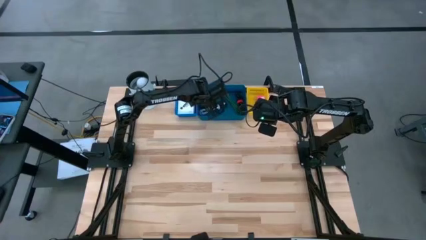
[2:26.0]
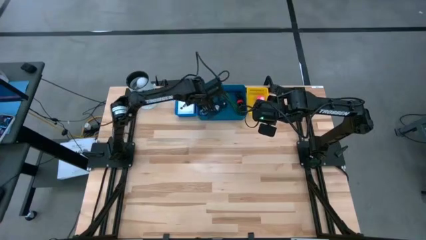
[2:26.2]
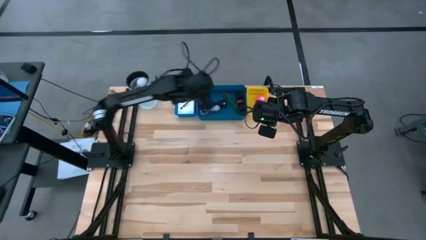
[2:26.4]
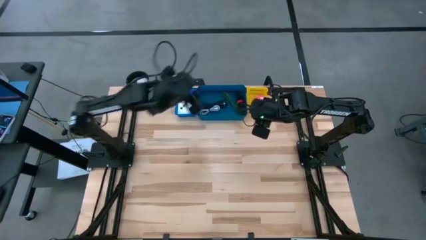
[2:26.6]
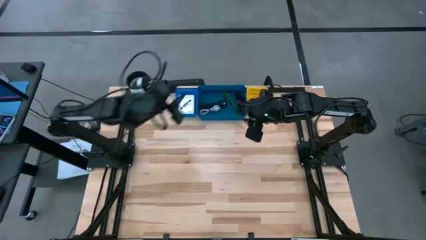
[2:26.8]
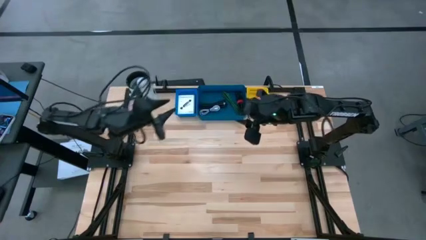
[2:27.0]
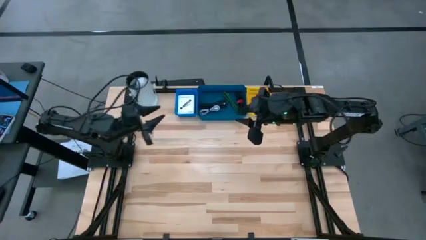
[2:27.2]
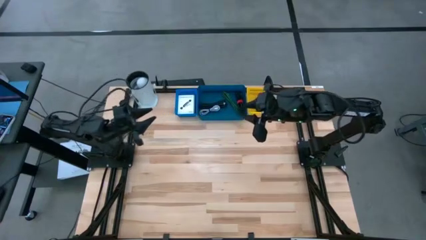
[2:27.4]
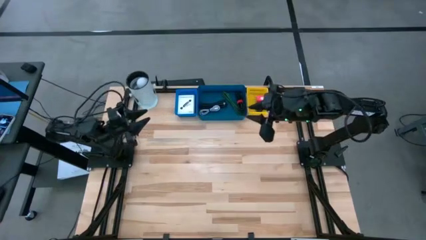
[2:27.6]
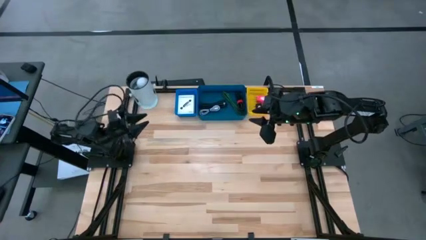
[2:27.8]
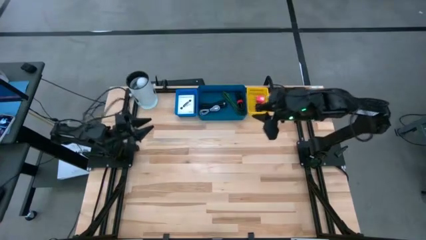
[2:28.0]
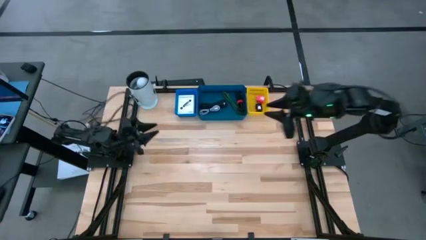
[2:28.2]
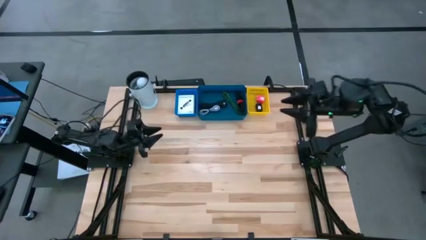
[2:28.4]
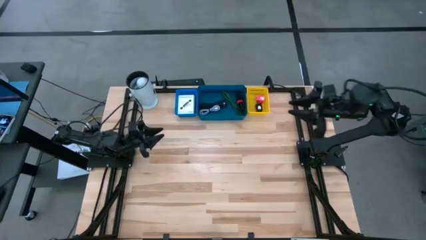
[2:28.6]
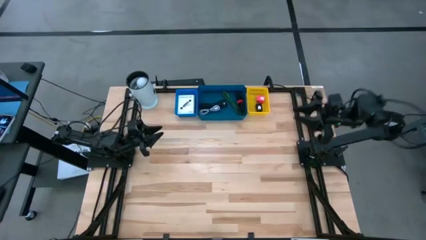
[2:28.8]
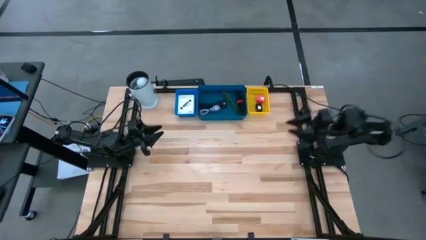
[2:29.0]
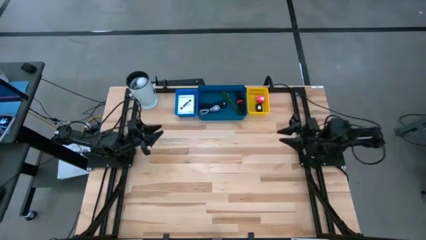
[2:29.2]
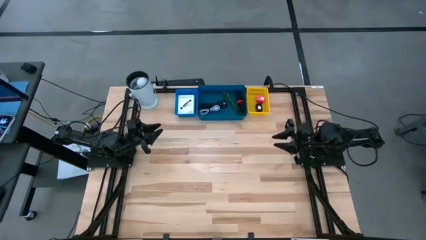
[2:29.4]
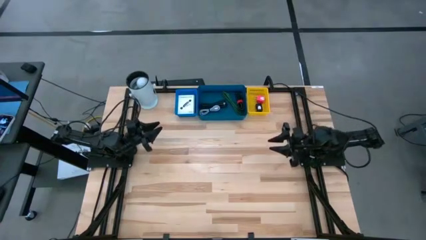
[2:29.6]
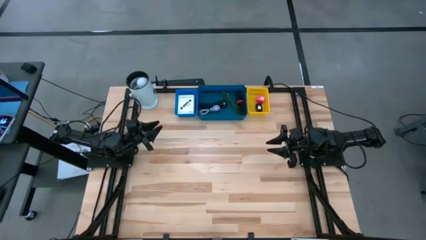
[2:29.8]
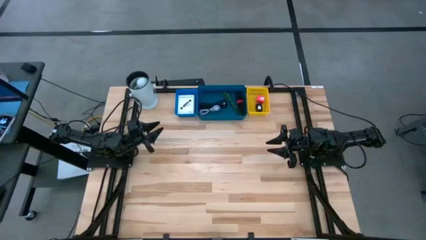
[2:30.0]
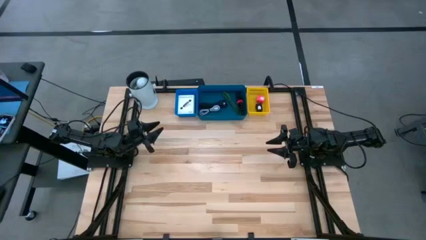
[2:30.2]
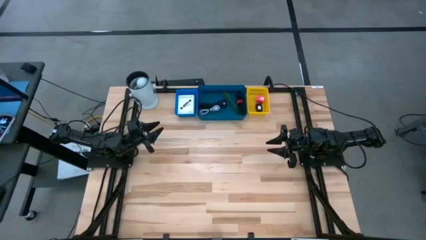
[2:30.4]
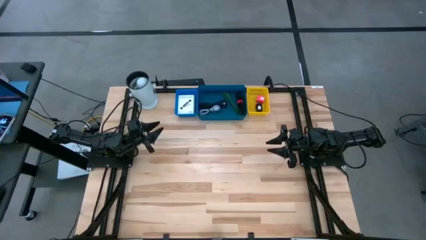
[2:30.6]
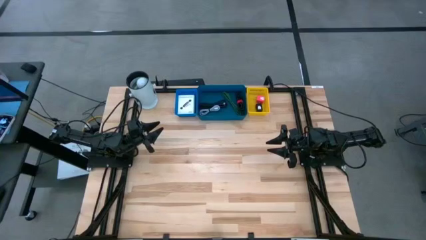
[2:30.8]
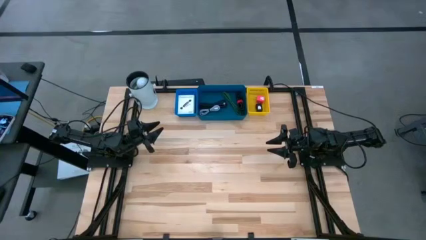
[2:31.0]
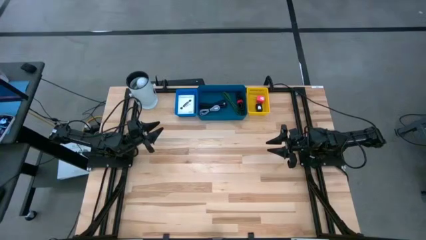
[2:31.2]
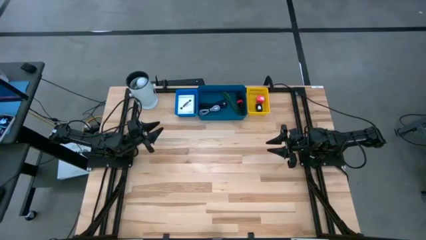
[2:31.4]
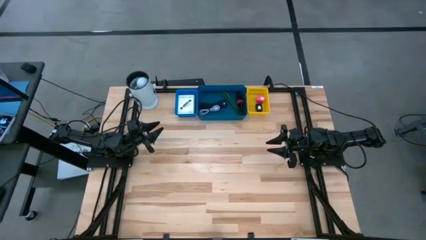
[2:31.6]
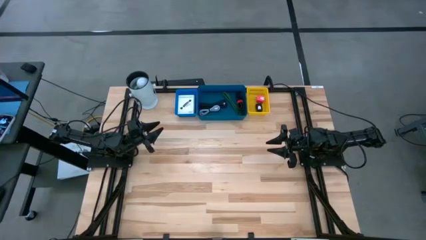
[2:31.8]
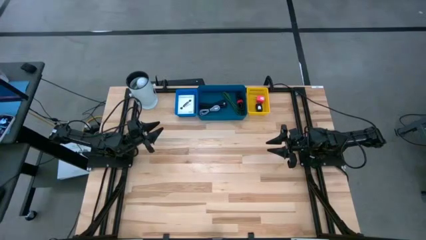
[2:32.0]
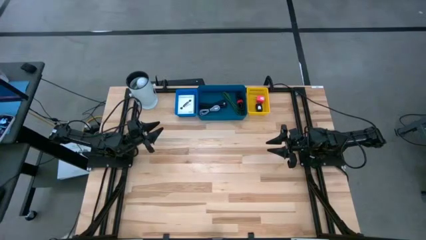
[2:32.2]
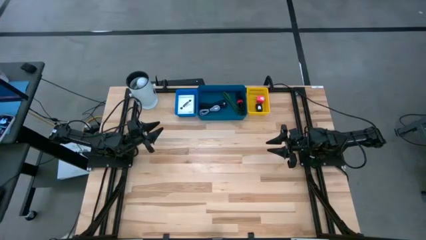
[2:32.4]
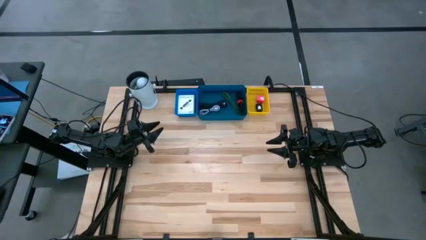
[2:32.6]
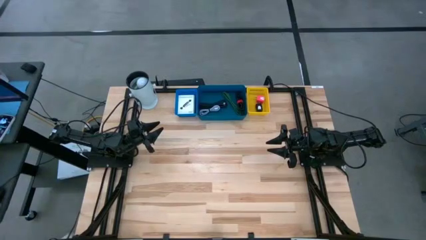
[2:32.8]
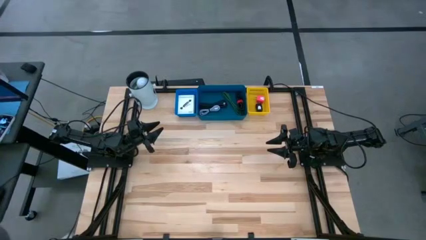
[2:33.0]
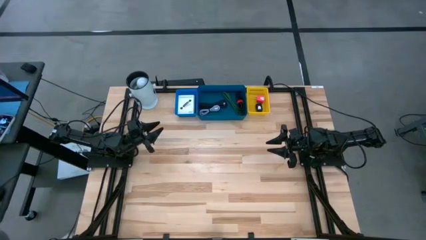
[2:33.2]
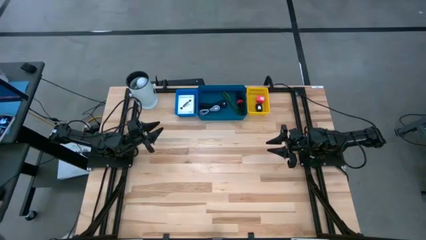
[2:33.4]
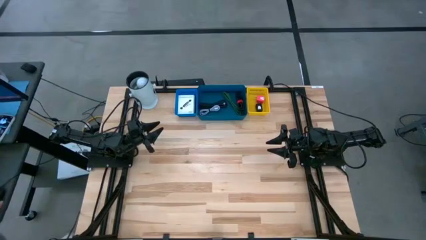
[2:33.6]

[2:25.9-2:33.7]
Task: Pick and place items into bin
Return to Home Position

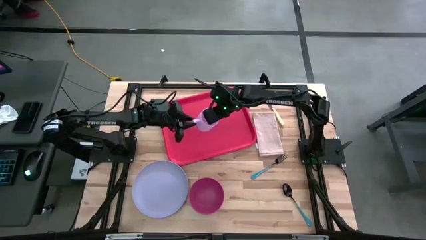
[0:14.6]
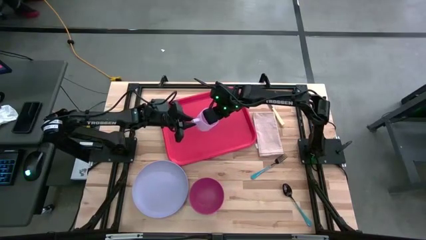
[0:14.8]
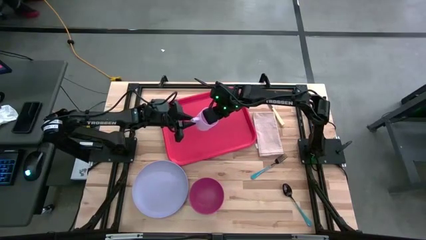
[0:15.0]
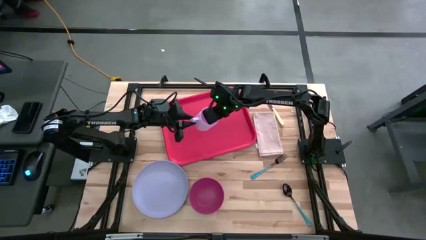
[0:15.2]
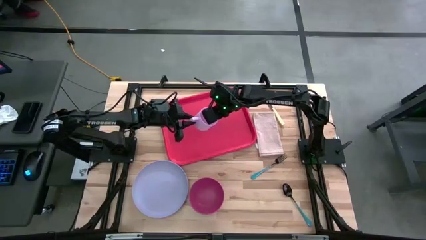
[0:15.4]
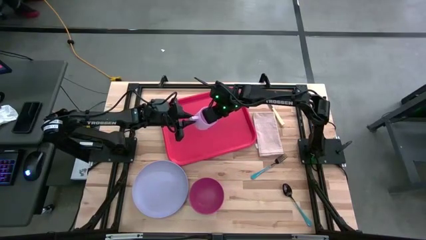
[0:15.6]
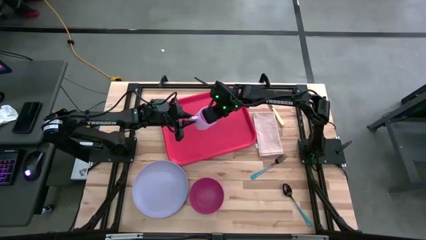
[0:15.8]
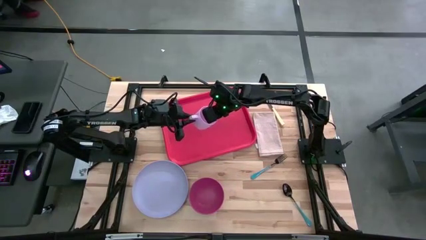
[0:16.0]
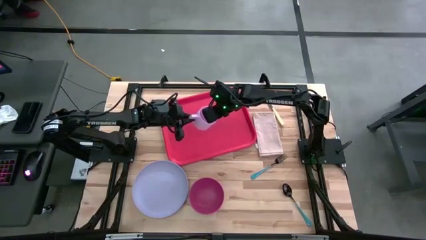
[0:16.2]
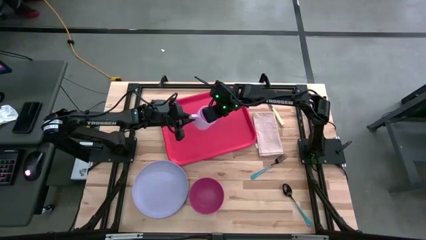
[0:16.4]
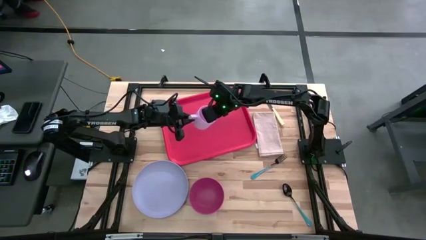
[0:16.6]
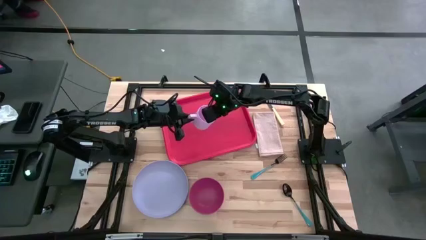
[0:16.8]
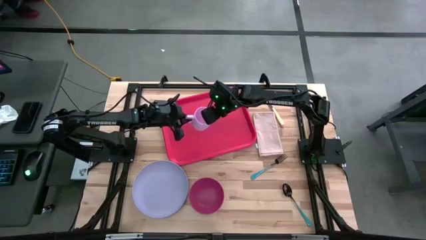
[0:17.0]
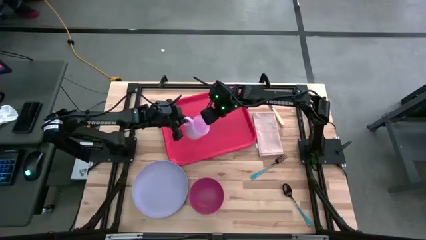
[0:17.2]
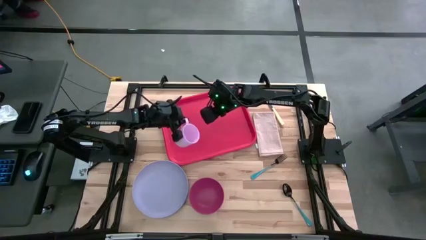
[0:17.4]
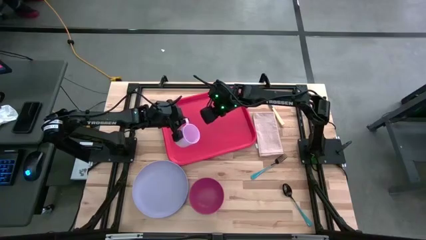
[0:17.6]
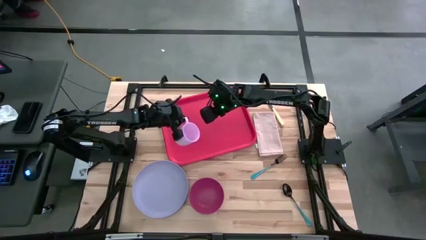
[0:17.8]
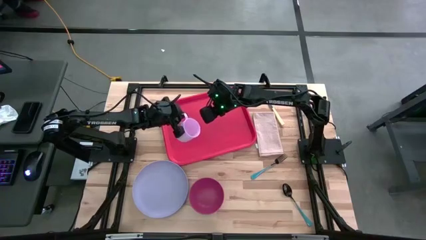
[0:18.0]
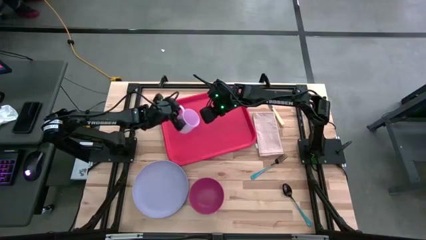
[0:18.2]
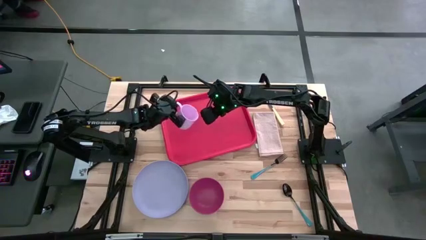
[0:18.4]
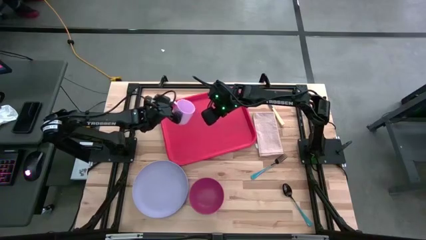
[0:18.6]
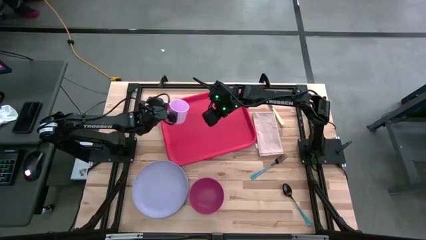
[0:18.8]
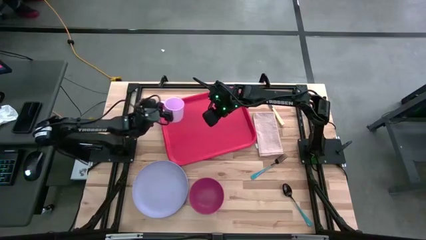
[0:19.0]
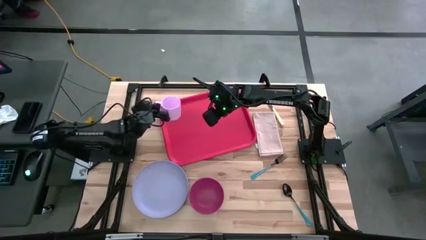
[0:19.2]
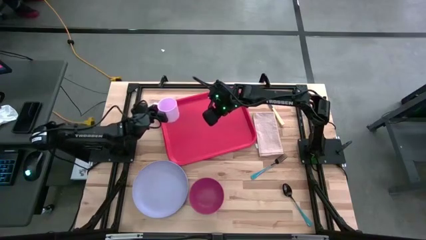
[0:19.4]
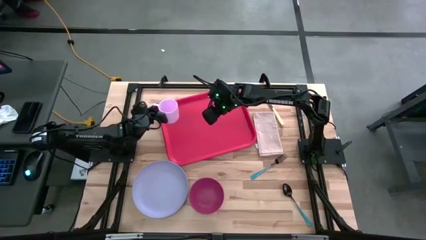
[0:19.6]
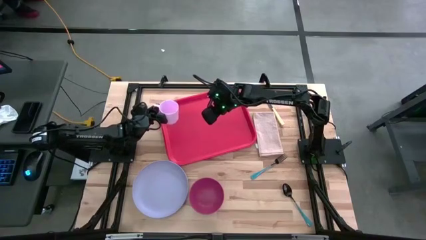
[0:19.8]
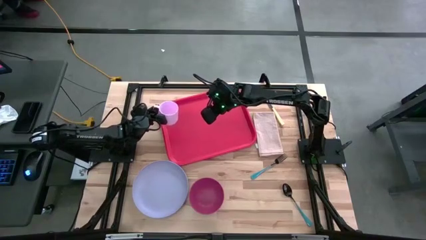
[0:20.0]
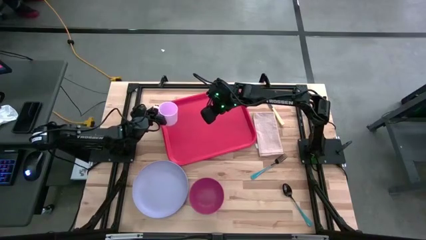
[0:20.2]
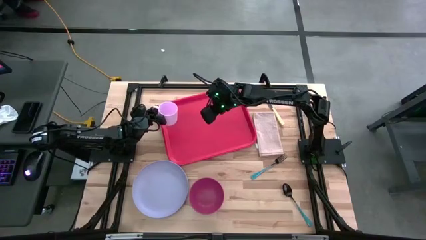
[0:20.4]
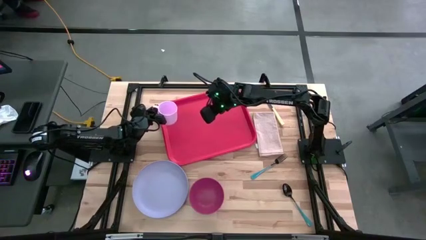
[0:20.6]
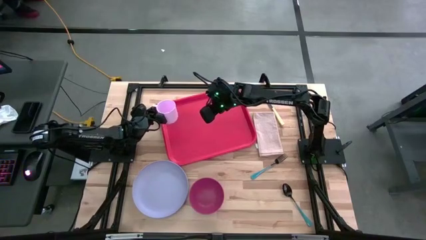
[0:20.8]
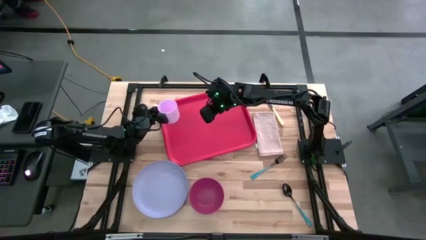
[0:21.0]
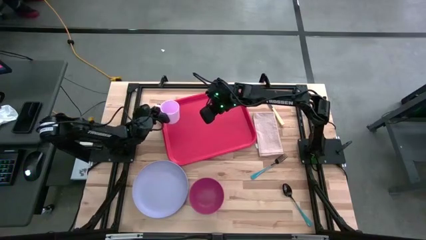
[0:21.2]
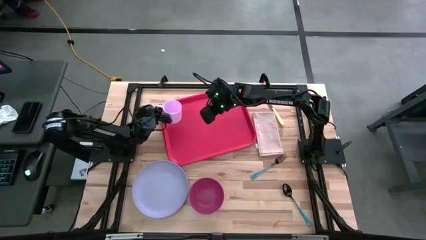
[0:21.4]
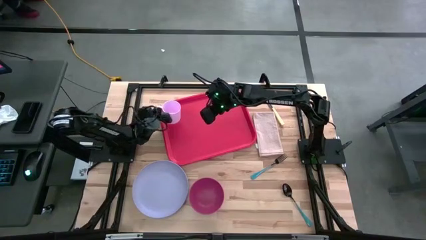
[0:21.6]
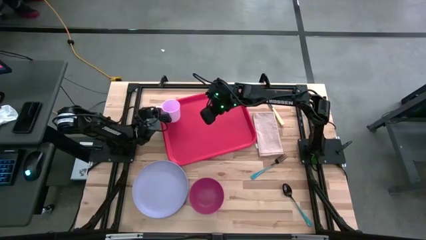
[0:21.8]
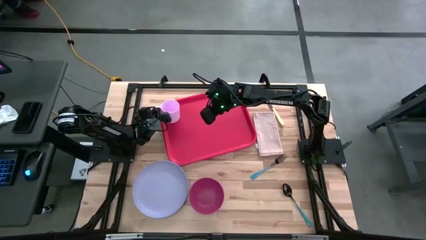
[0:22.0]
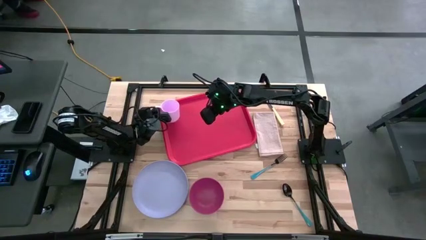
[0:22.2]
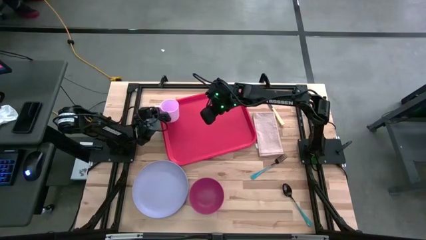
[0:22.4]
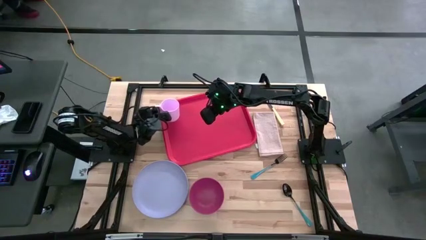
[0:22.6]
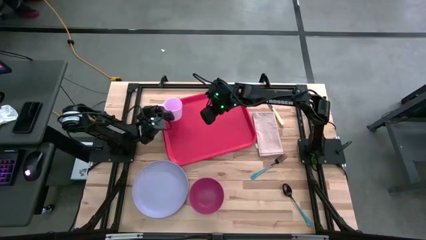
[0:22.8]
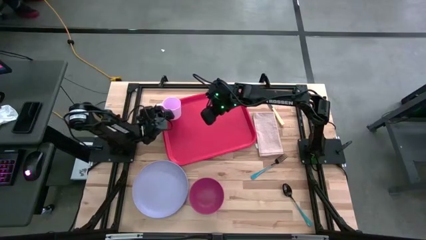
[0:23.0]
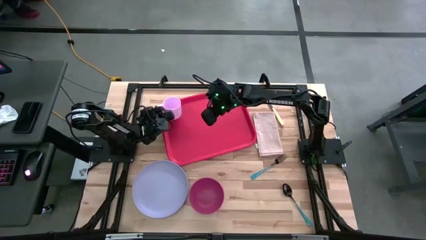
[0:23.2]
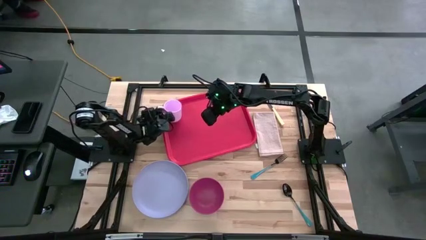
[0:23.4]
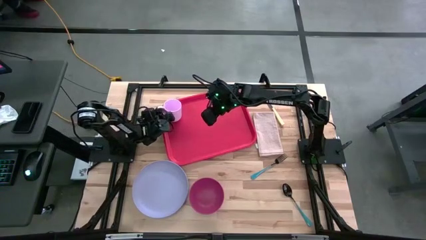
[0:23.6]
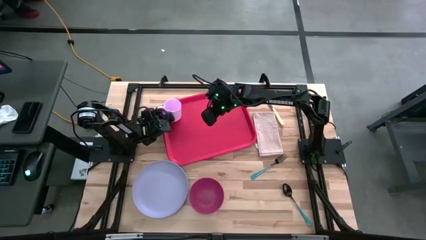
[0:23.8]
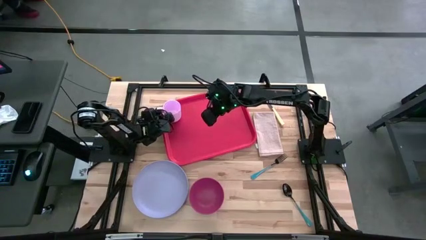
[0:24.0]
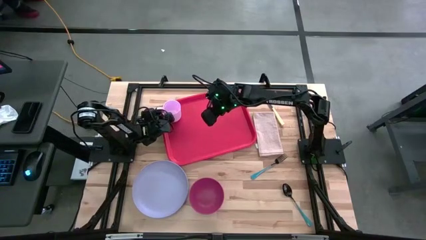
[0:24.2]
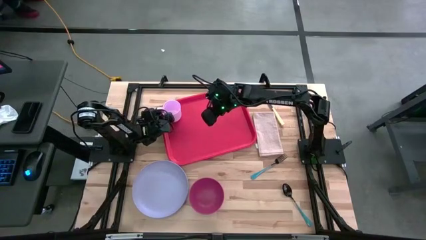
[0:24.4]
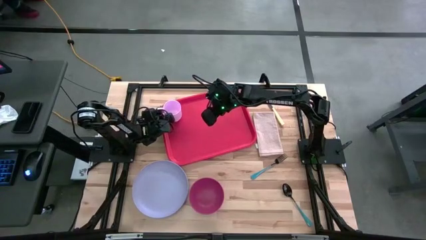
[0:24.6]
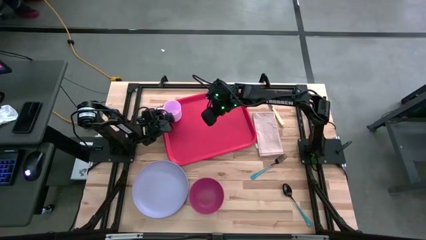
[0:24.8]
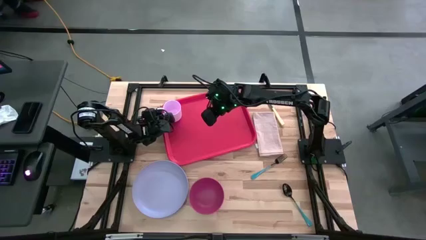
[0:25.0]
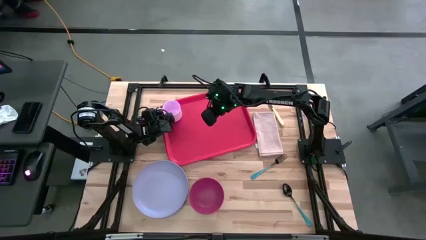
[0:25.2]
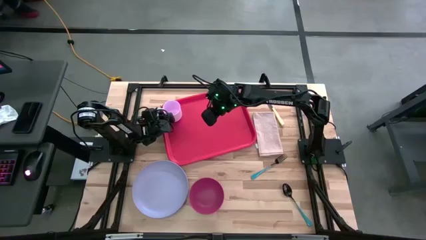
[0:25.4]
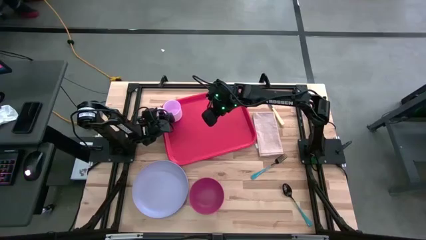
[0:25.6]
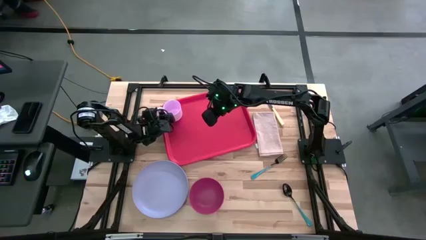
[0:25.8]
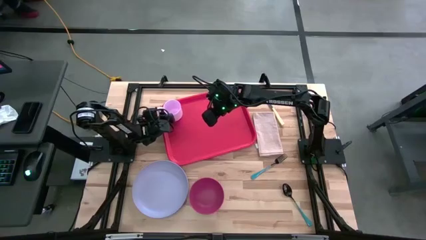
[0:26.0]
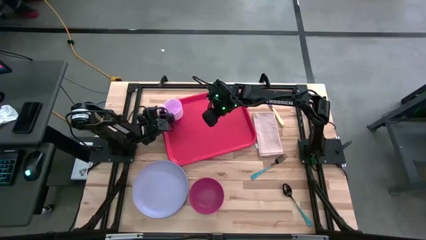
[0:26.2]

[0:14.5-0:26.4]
Task: Set up tray
Put the light pink mug at the top left of the red tray
